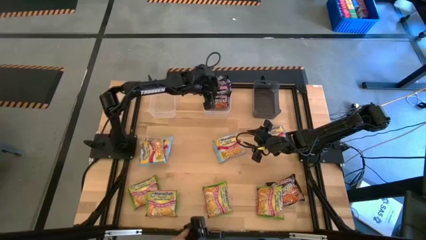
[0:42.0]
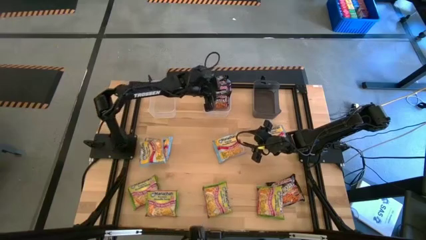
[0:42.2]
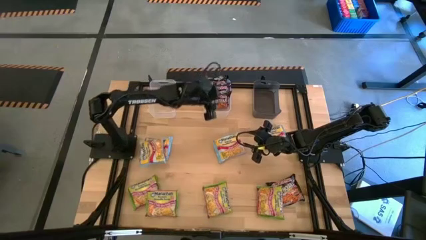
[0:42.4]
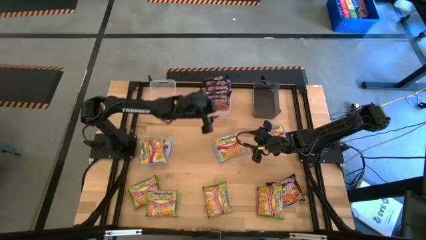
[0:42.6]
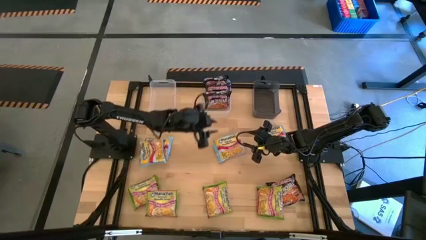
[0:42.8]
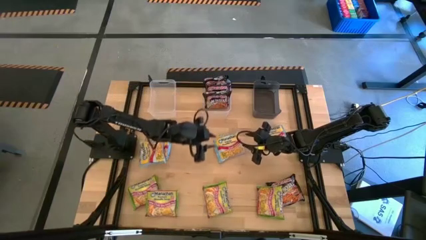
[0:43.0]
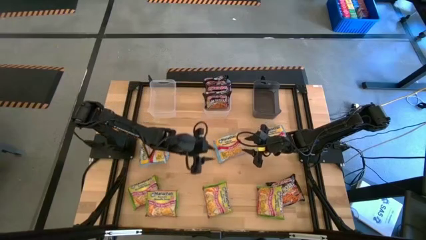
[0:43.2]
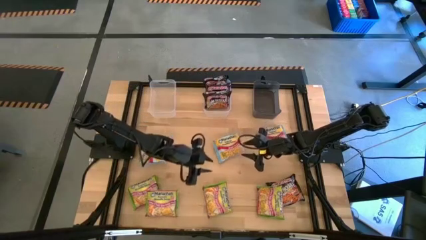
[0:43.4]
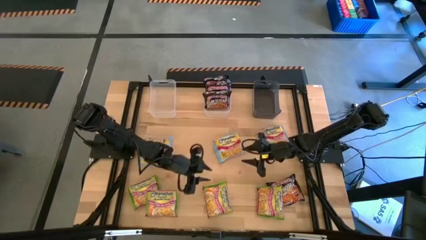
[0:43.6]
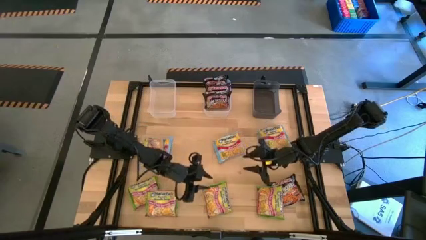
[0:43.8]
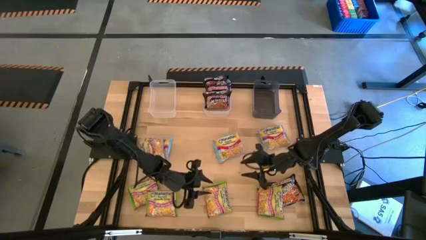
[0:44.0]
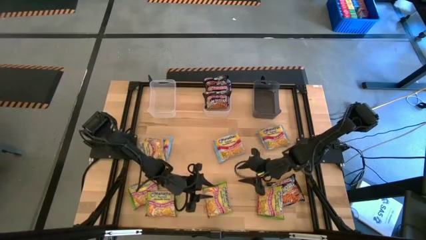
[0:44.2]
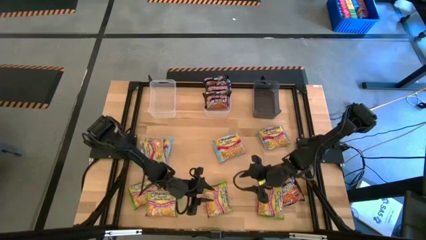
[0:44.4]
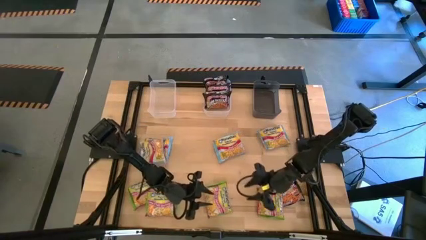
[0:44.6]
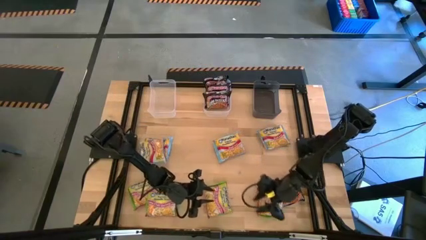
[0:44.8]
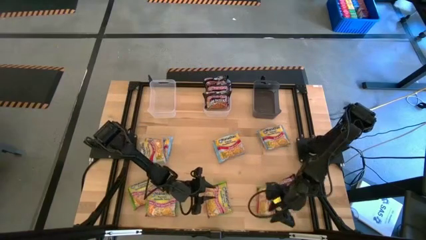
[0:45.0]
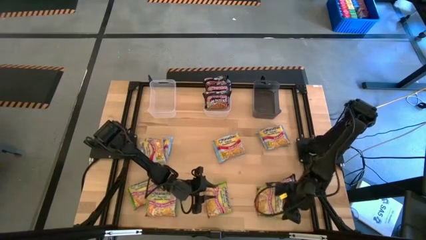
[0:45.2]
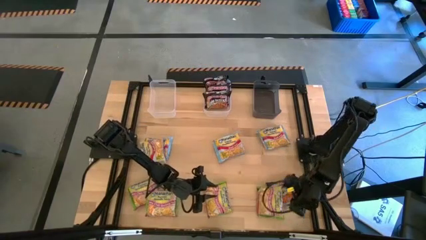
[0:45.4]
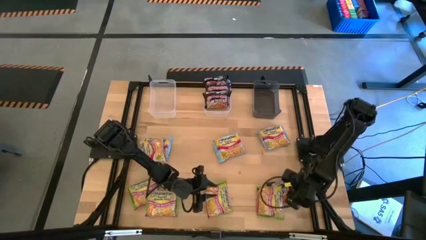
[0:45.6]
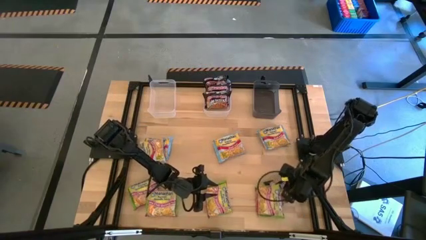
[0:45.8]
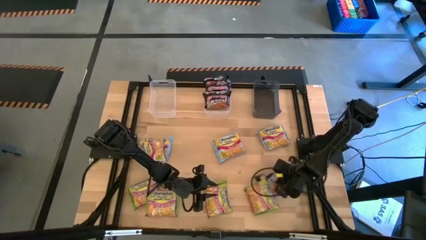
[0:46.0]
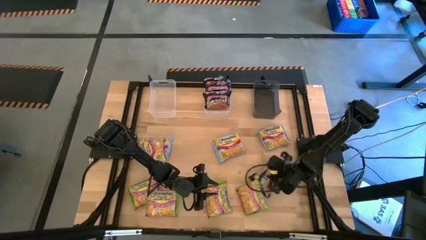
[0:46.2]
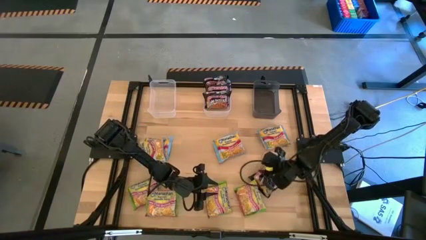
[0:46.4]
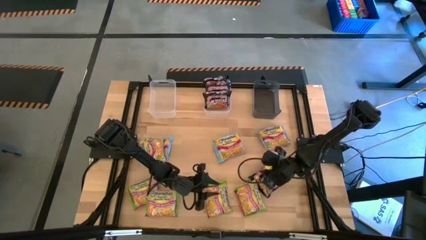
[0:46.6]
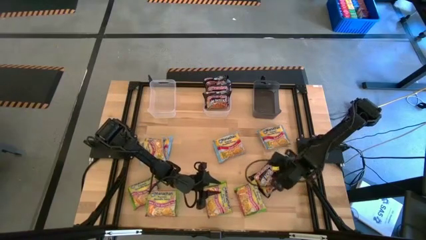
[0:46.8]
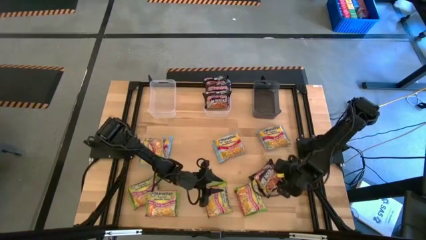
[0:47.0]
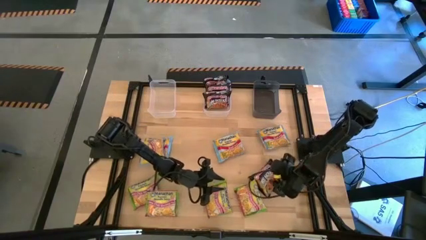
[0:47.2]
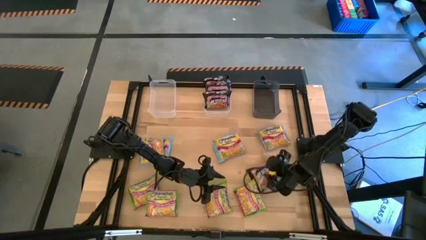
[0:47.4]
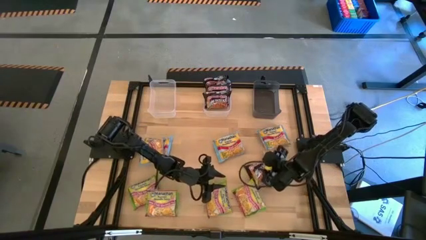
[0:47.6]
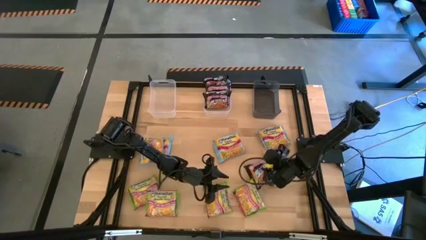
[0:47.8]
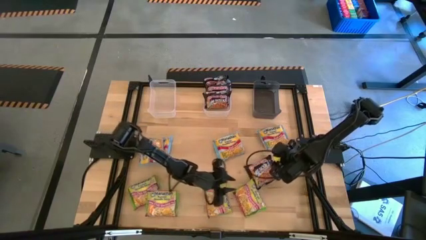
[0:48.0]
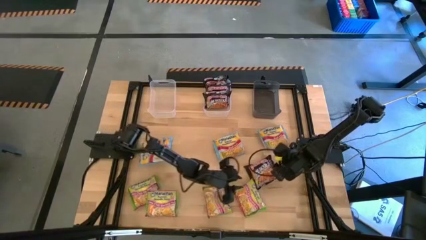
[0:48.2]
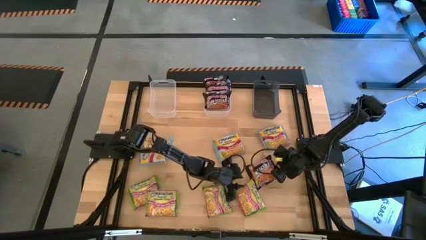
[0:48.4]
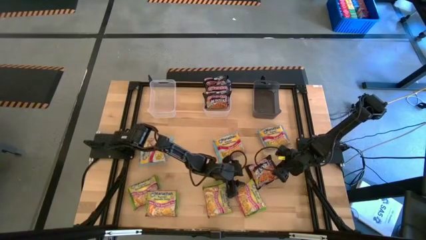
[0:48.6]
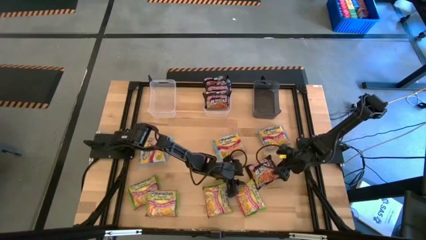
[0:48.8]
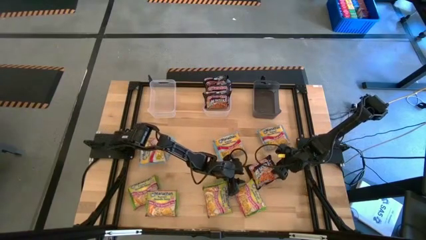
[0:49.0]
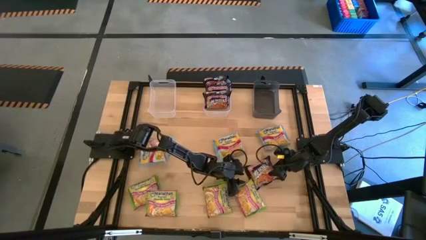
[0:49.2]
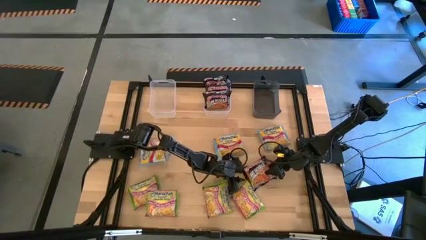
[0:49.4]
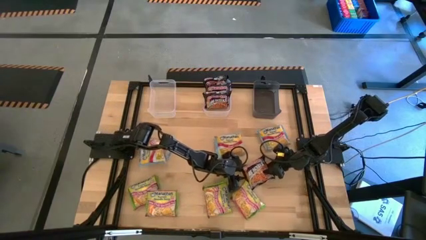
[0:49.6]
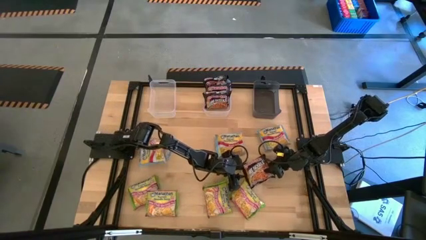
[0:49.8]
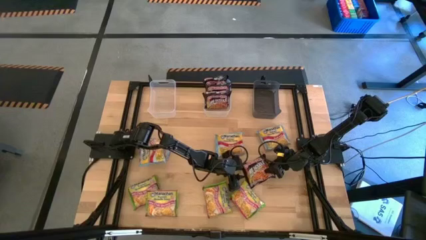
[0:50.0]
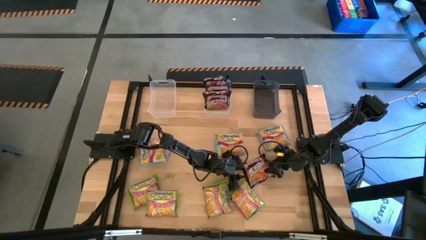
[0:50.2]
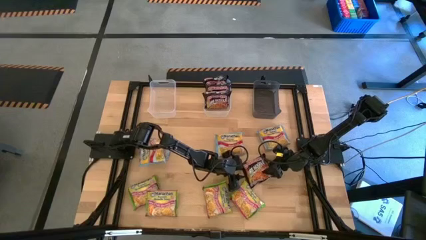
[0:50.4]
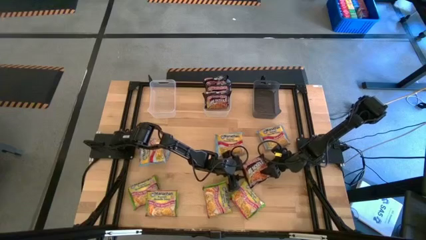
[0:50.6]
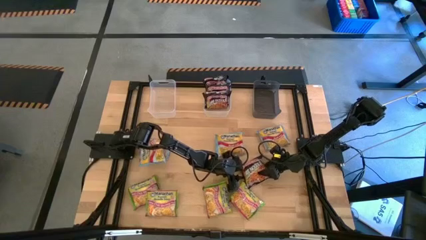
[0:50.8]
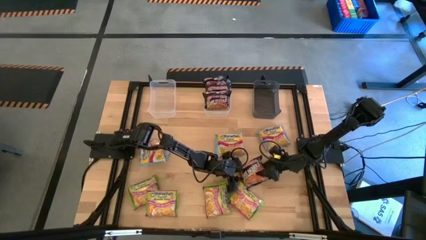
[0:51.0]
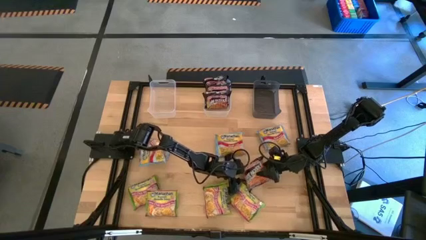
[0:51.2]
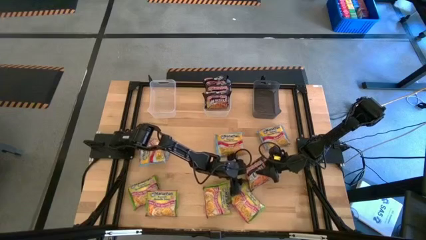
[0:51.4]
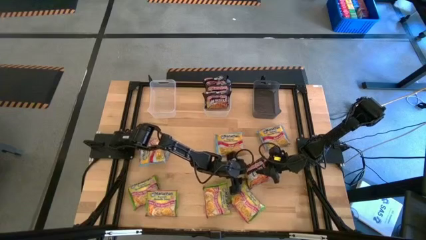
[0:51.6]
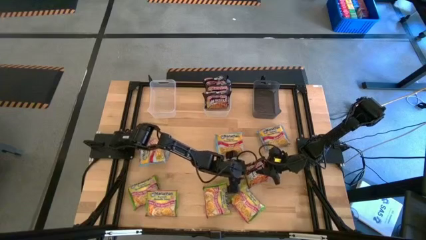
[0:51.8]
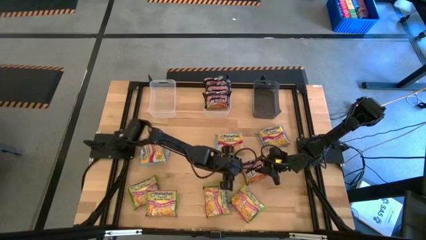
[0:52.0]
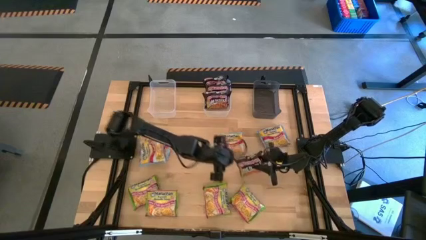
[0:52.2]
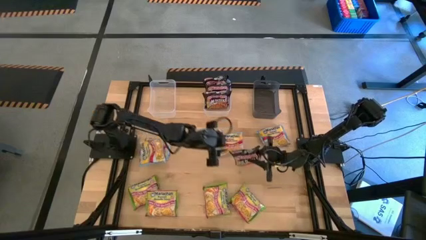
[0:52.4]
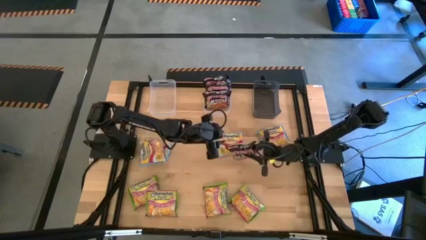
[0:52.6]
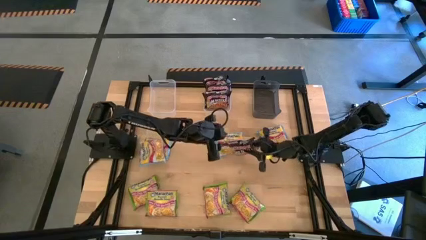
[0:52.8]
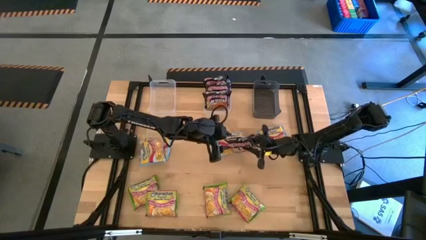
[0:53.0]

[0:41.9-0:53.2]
Task: Sort Maruchan noodles
Put the black noodle pack into the right transparent bin
